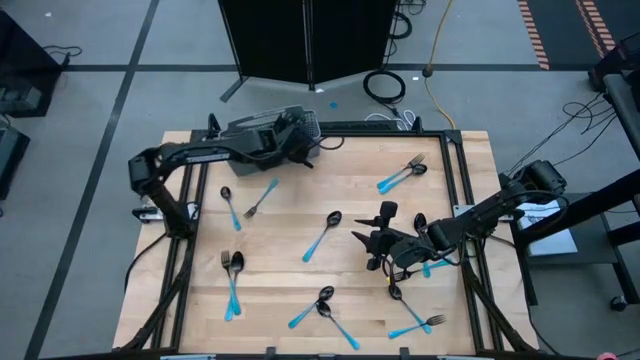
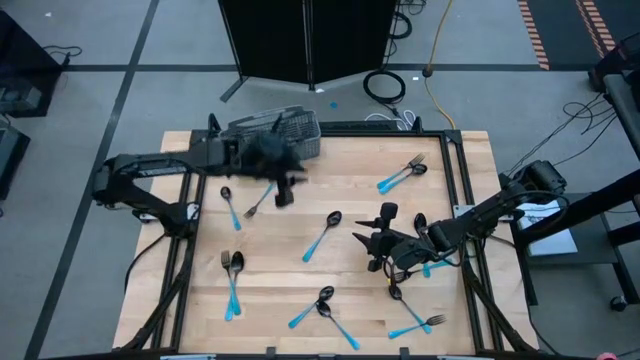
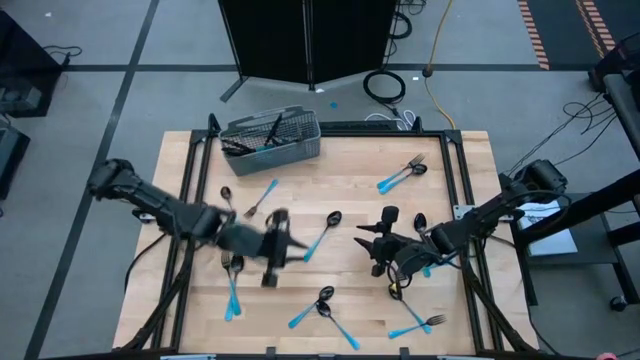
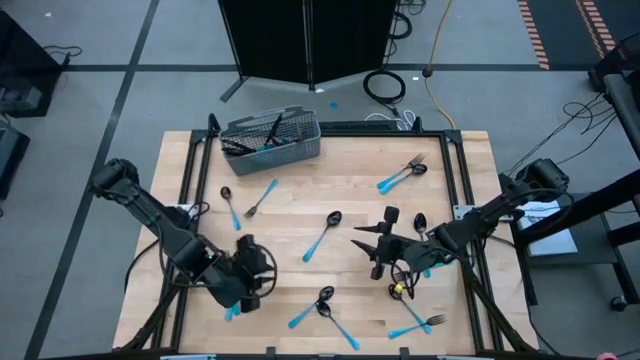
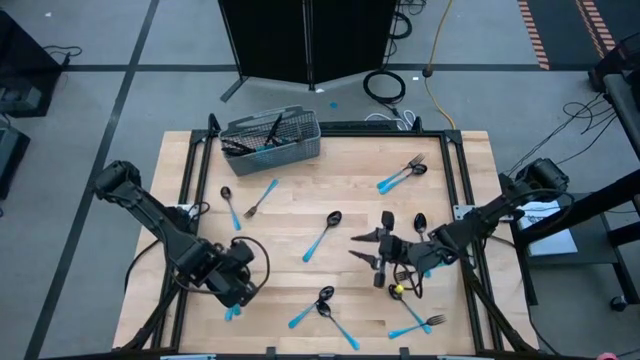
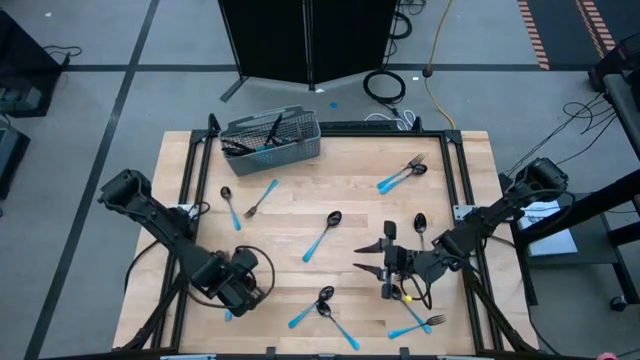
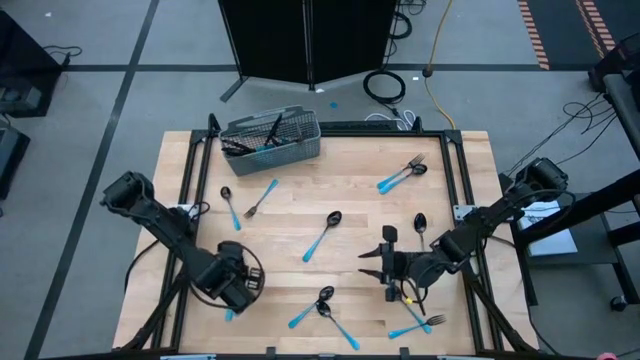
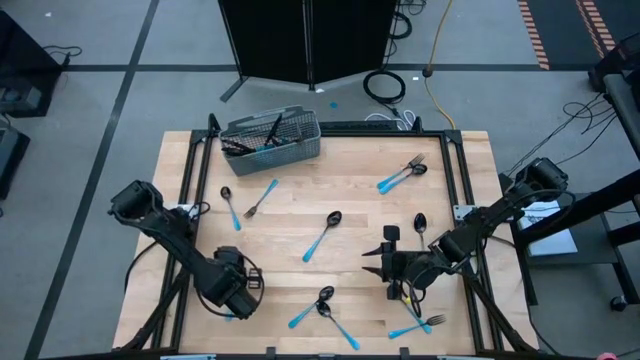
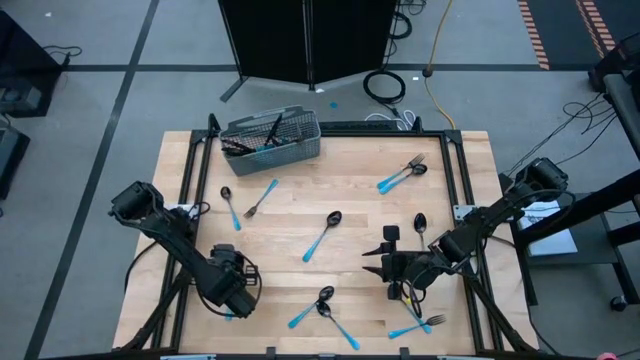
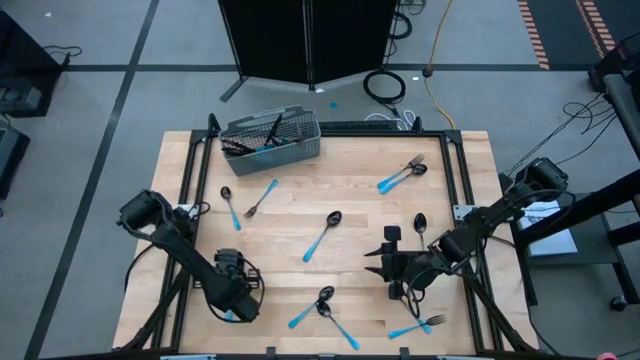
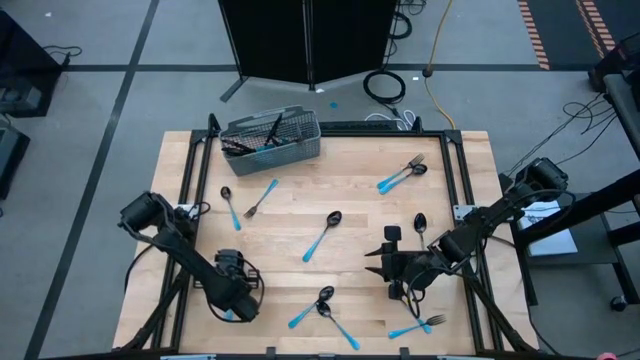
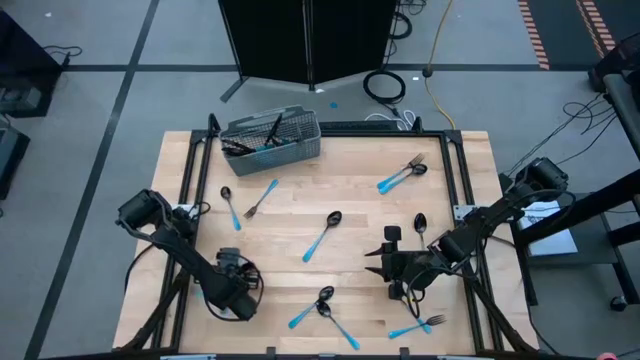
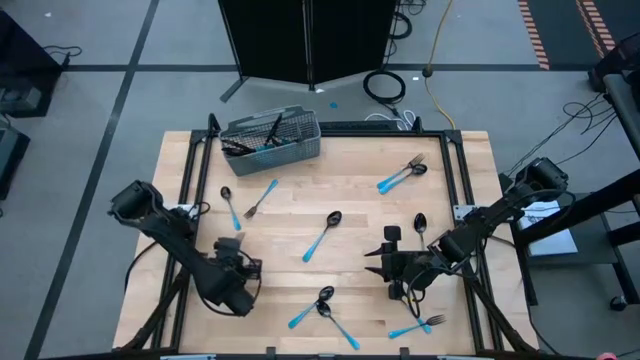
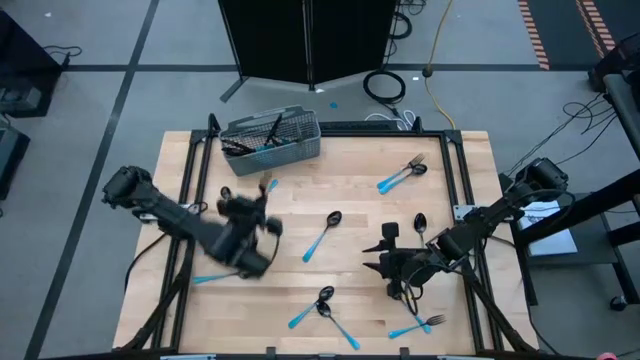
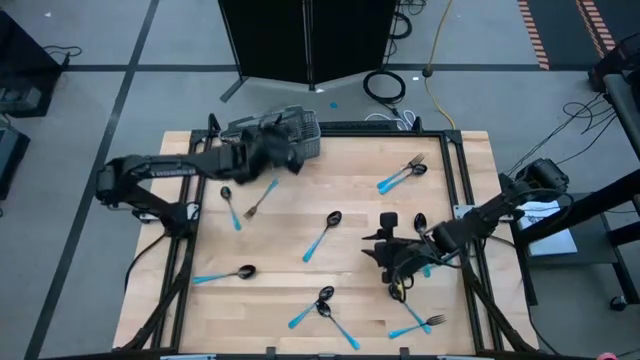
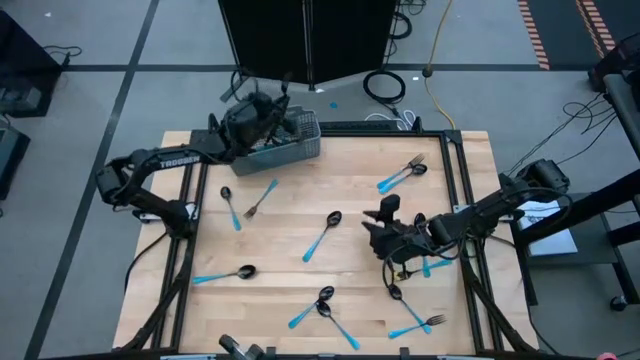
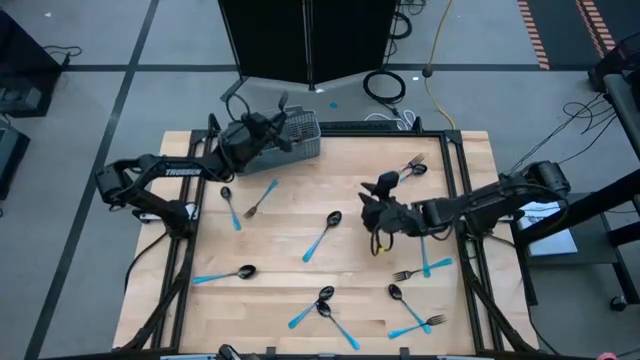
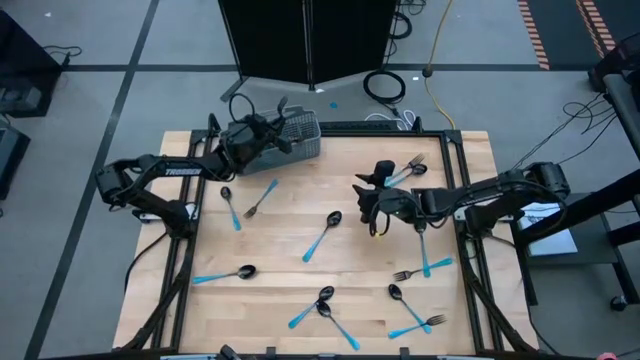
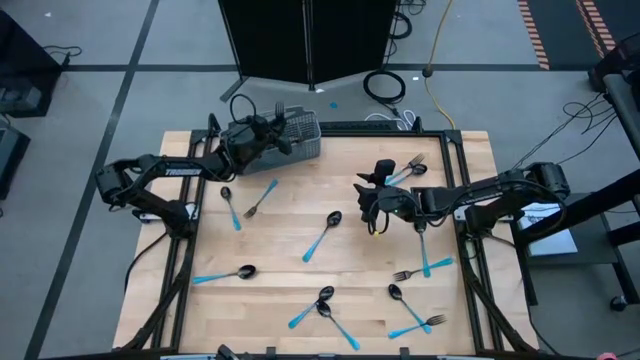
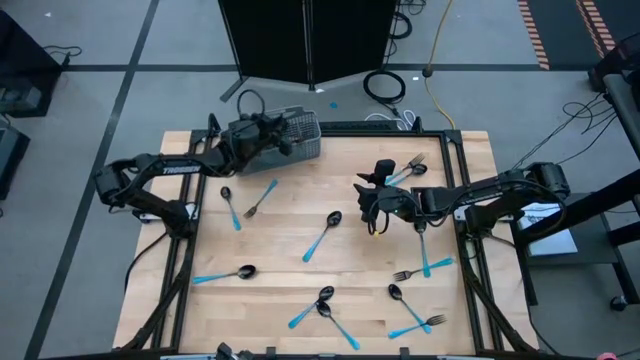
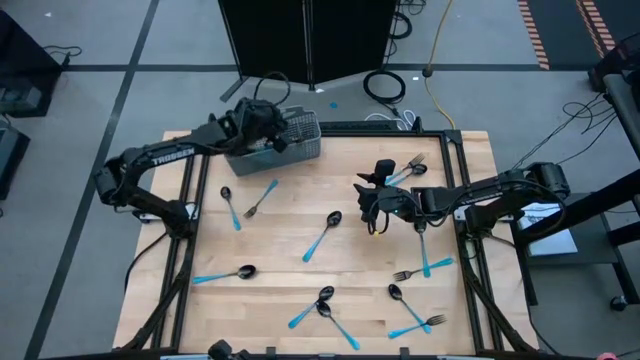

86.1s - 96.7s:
Task: Sort silverware
Put the blue fork into the silverware basket

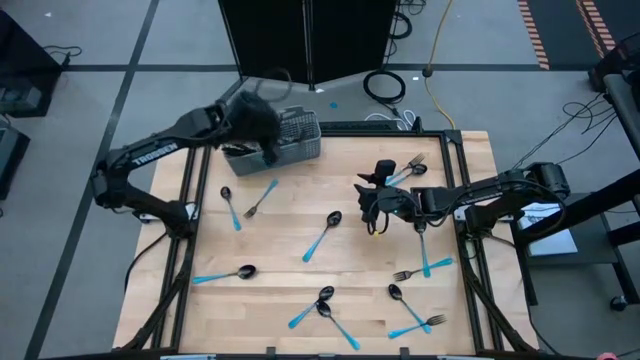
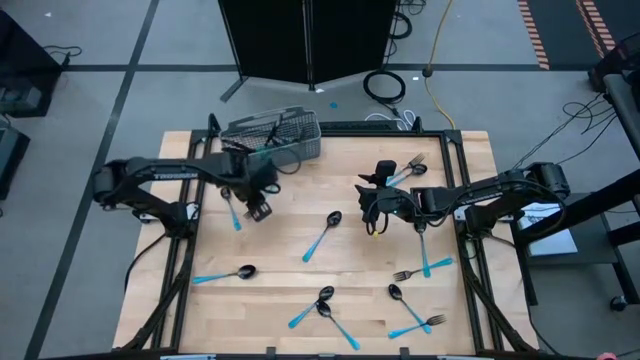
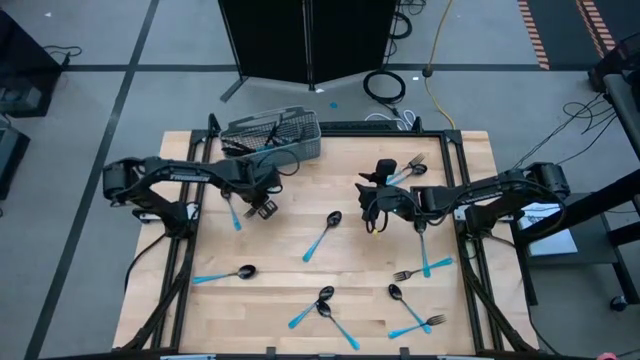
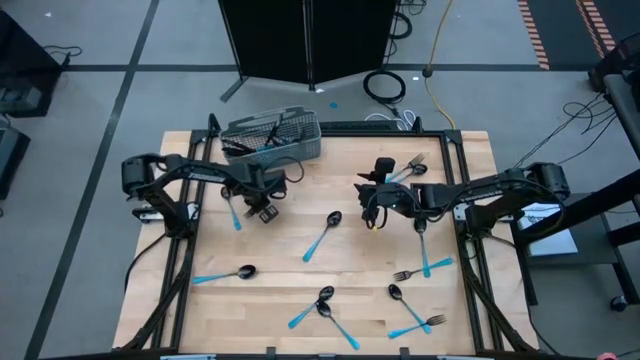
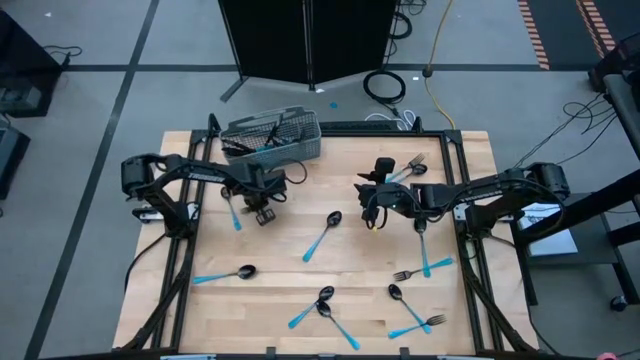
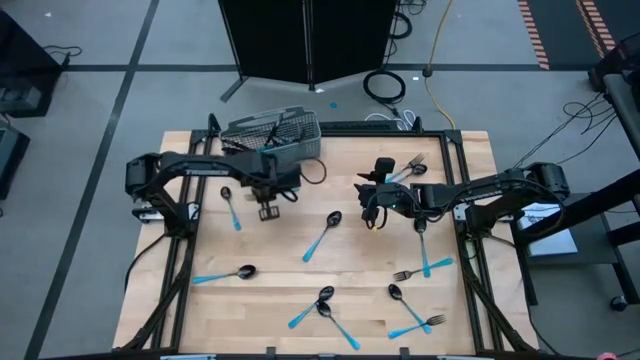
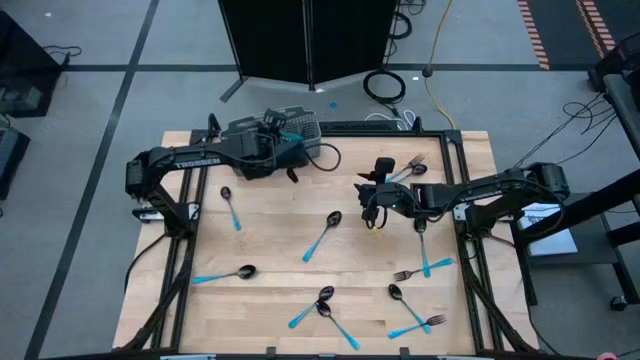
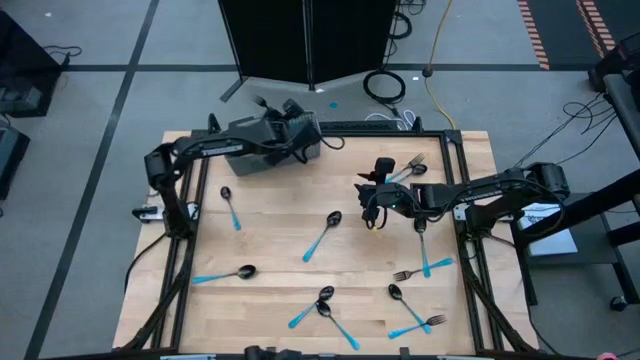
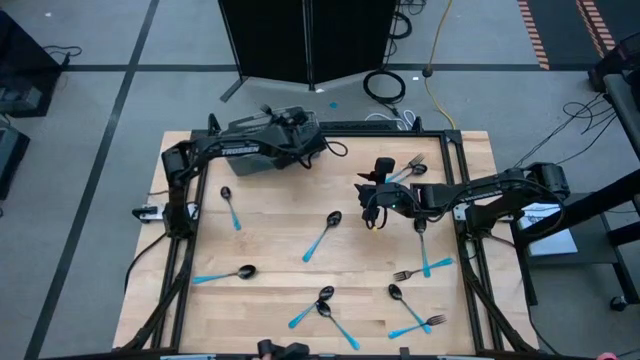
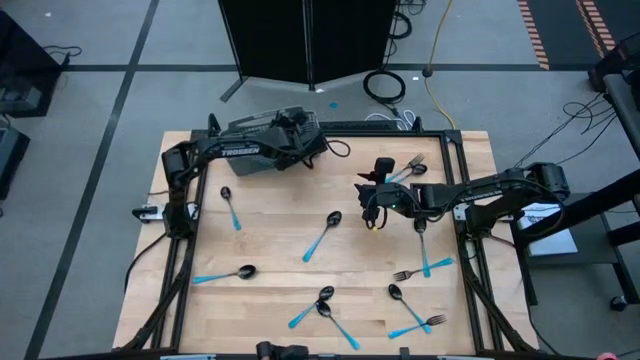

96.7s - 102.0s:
Put the blue fork into the silverware basket

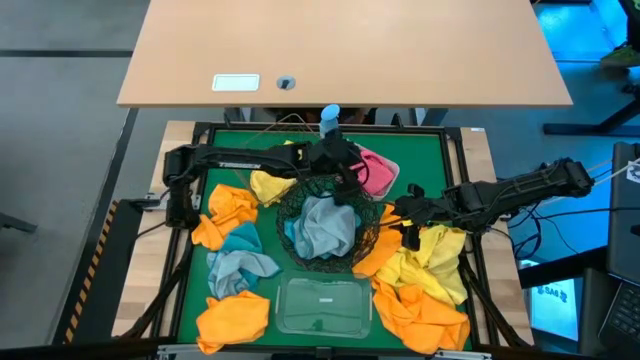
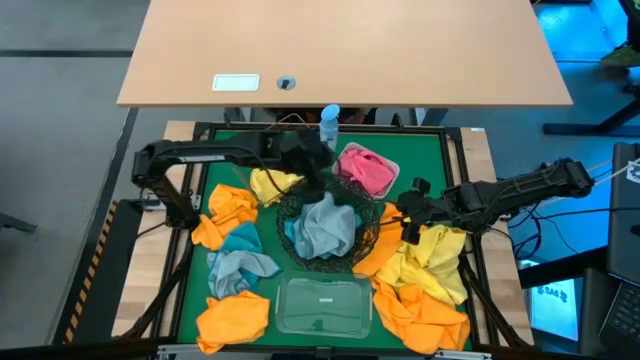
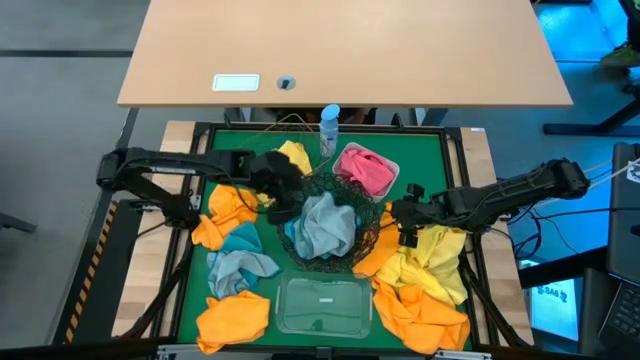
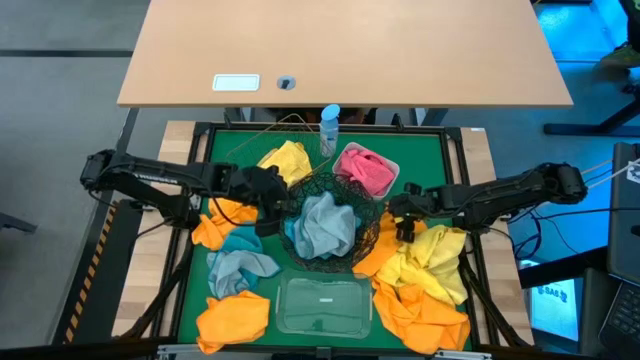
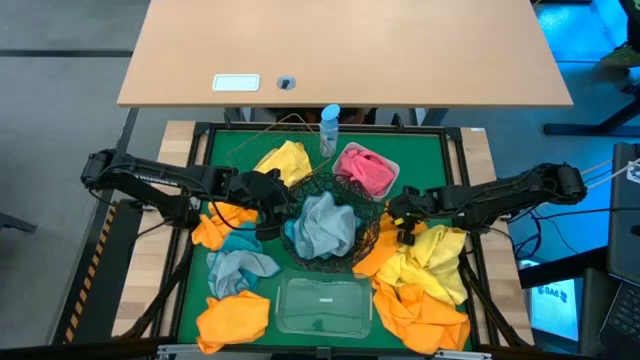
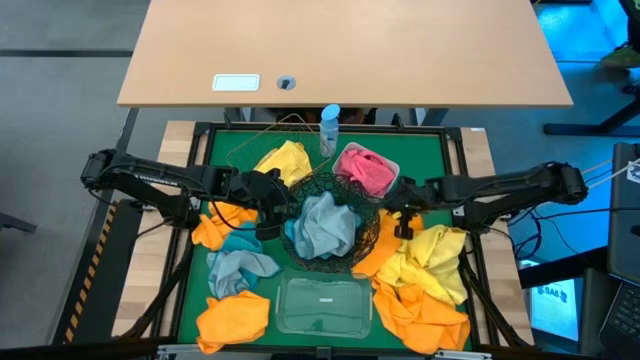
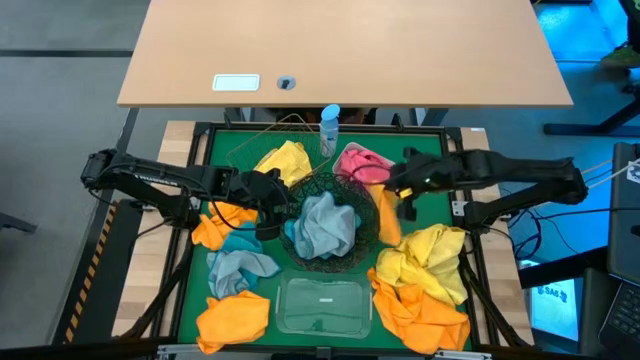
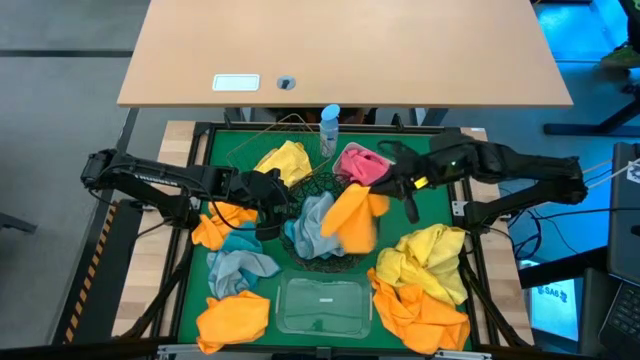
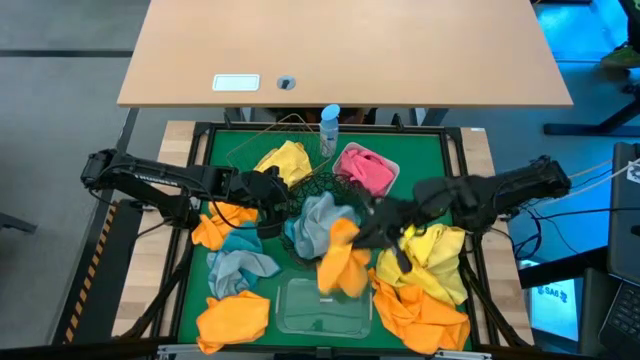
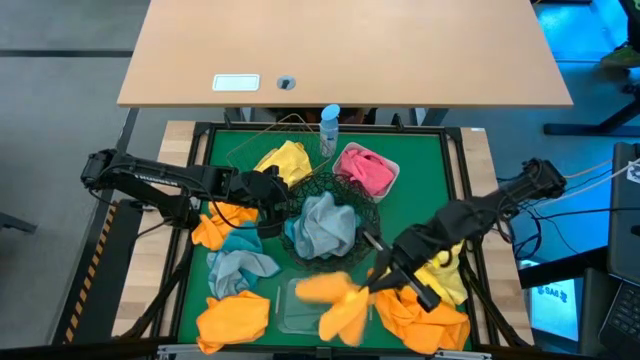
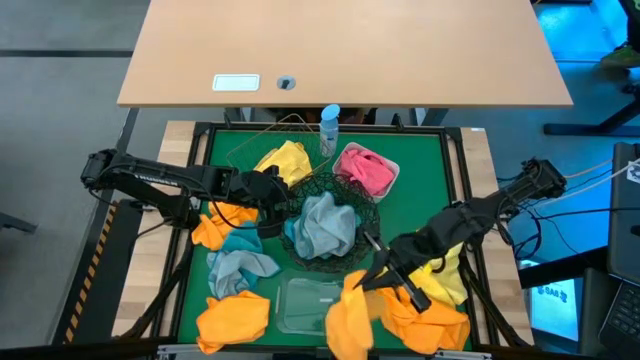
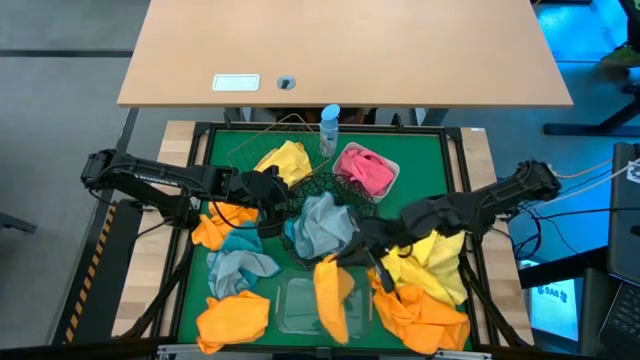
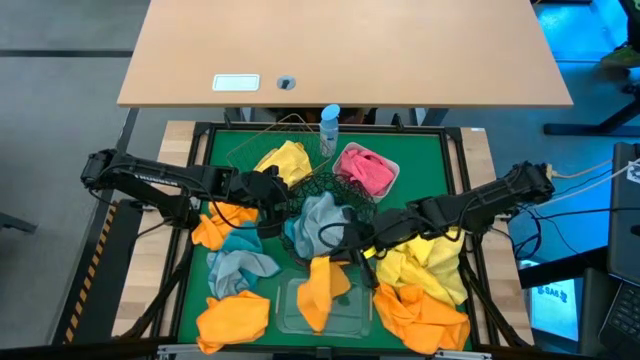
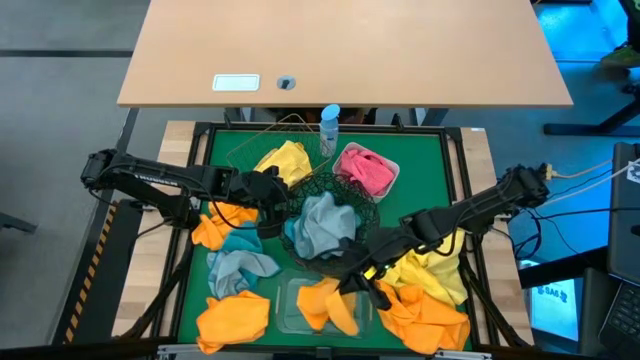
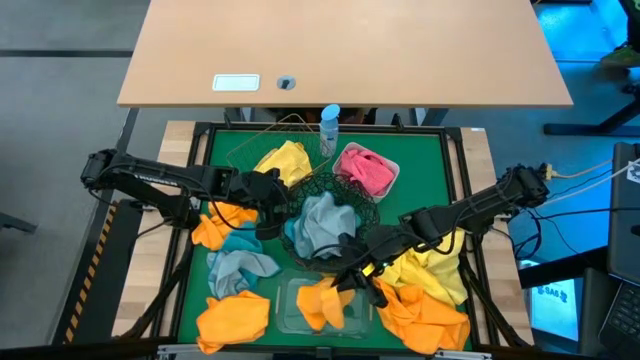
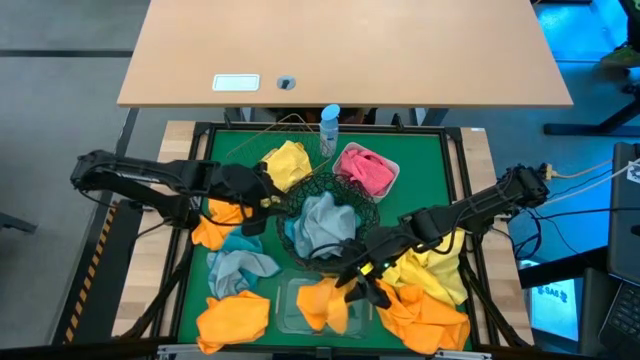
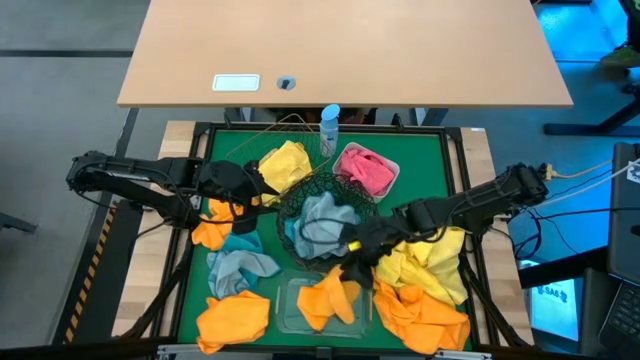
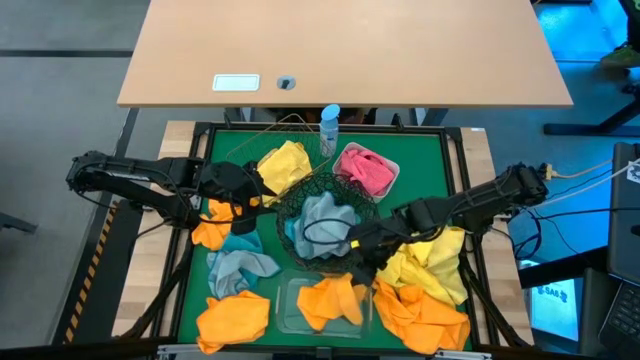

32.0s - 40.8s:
Task: Sort microfiber towel by color & place in baskets
Put the orange microfiber towel into the transparent bin
